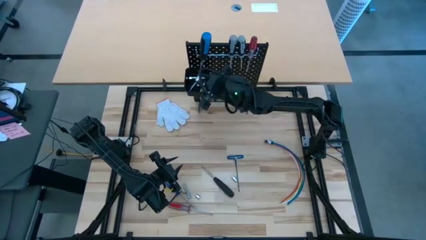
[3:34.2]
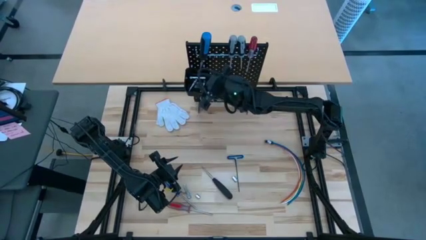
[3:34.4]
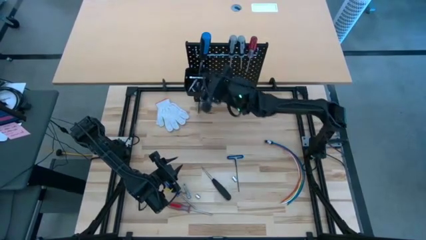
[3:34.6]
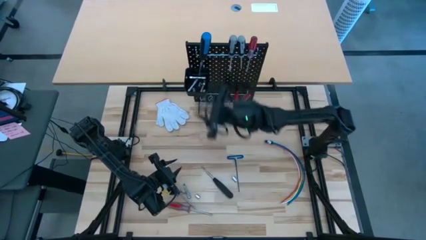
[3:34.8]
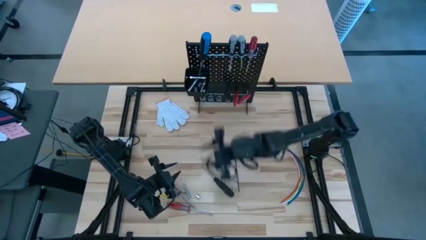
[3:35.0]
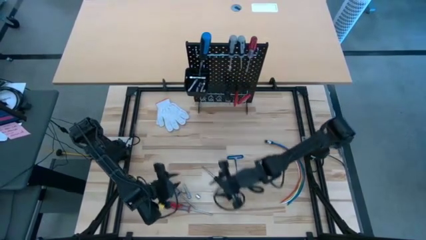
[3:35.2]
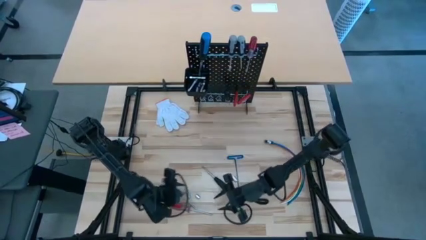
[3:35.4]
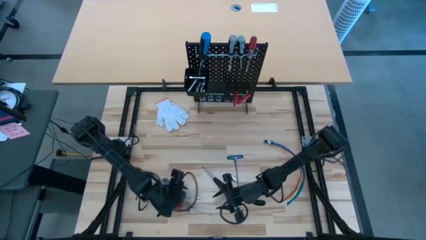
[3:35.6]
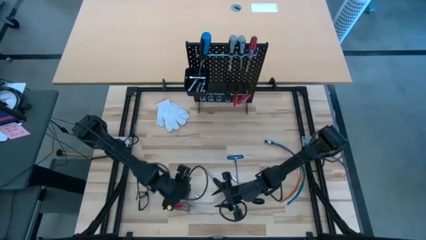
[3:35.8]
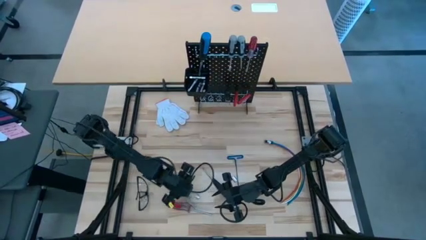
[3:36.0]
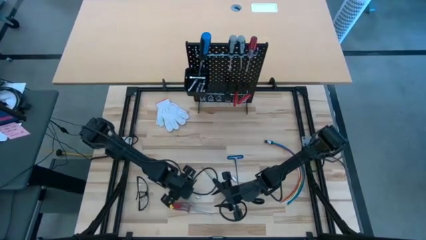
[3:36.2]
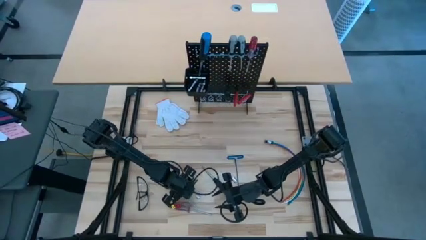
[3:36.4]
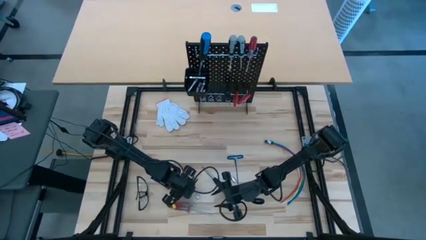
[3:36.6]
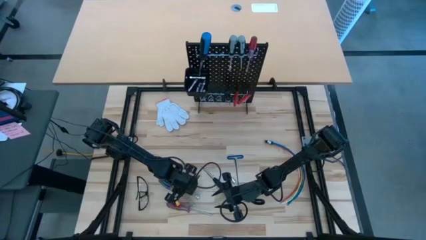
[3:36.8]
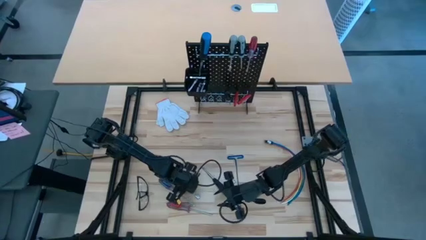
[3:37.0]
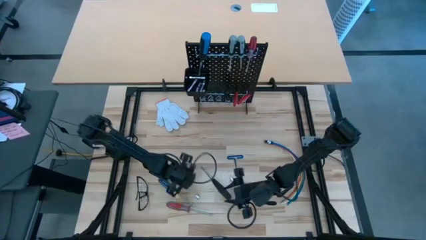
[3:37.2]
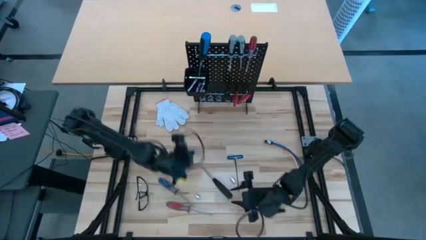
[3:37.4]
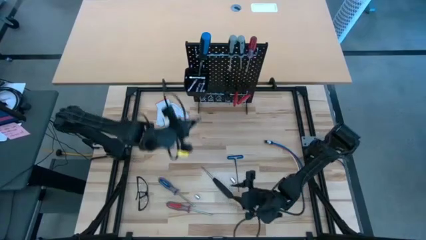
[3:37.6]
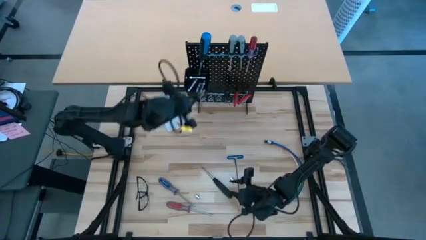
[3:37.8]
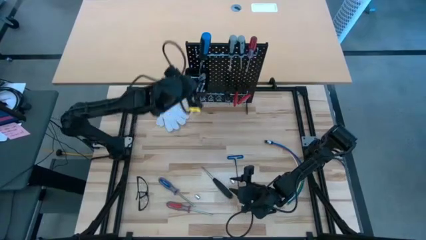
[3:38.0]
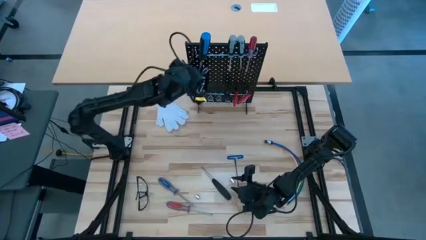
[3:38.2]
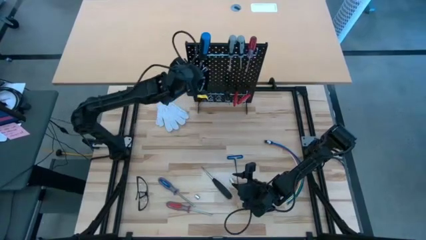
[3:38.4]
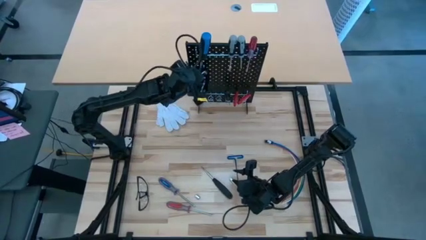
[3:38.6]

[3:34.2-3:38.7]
Task: Hang tools onto peg board
Put the extension bar on the pegboard bin

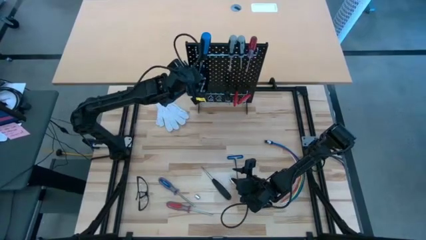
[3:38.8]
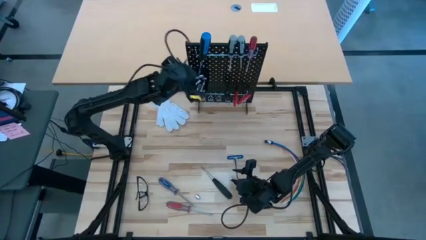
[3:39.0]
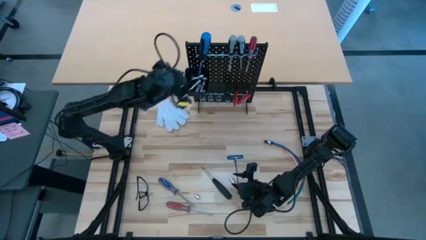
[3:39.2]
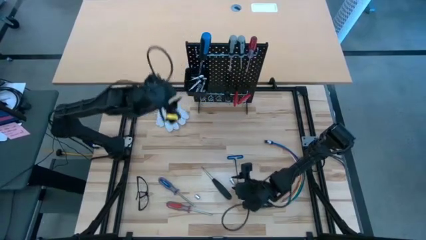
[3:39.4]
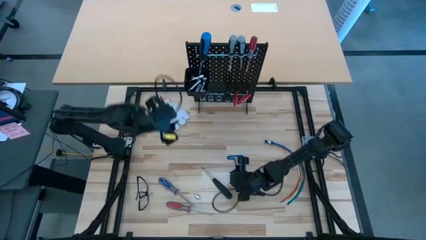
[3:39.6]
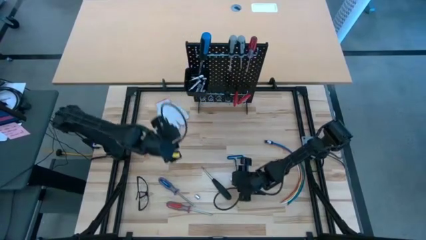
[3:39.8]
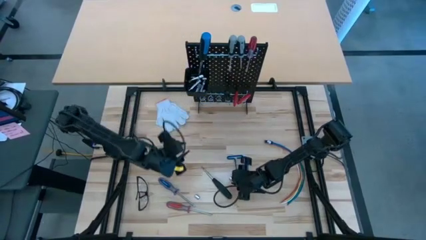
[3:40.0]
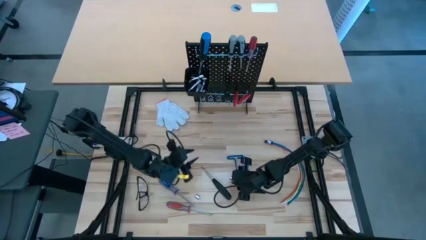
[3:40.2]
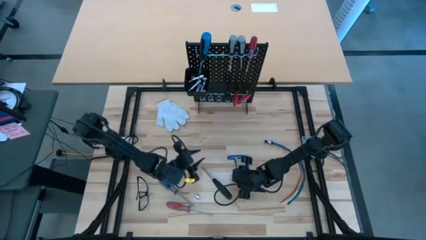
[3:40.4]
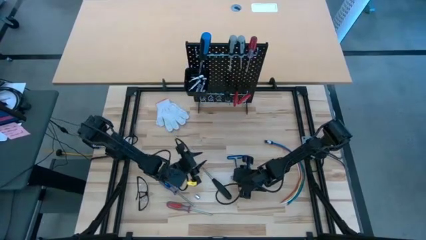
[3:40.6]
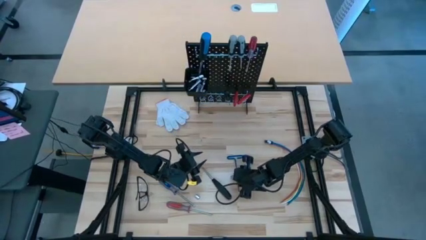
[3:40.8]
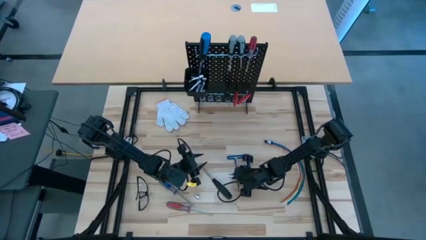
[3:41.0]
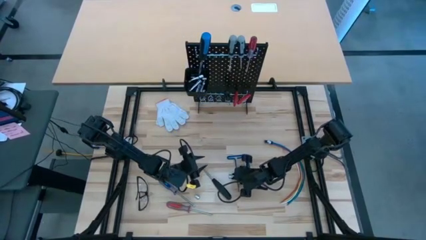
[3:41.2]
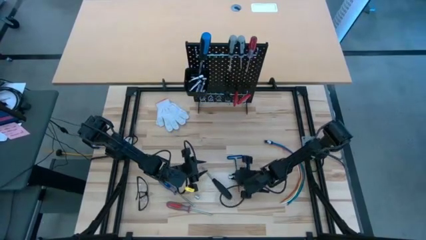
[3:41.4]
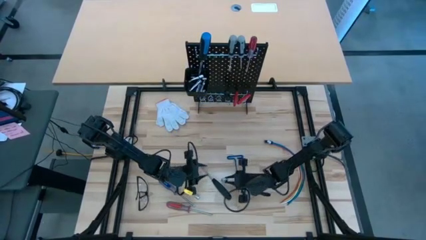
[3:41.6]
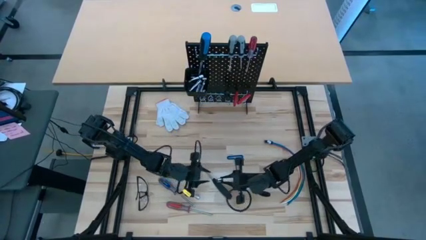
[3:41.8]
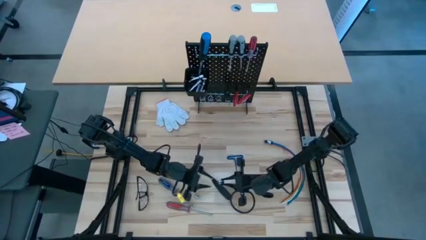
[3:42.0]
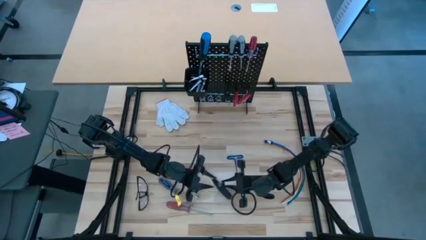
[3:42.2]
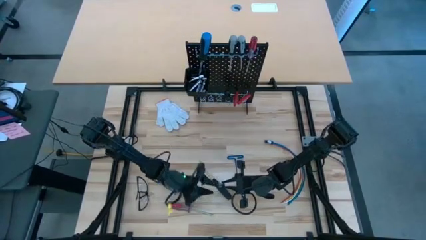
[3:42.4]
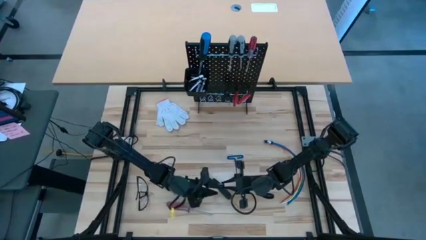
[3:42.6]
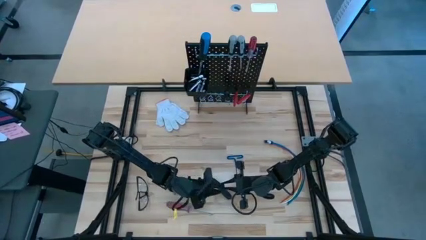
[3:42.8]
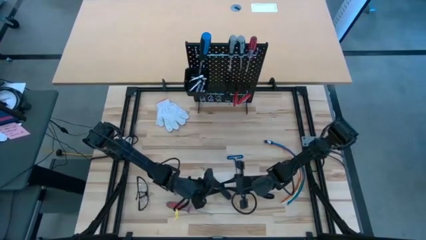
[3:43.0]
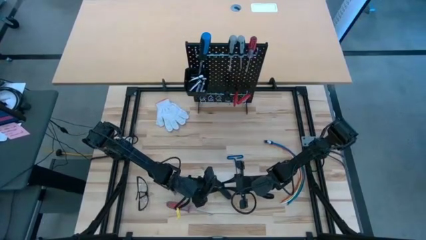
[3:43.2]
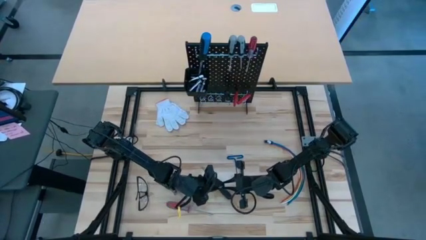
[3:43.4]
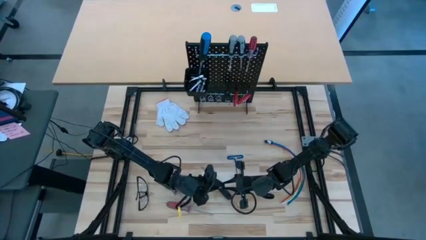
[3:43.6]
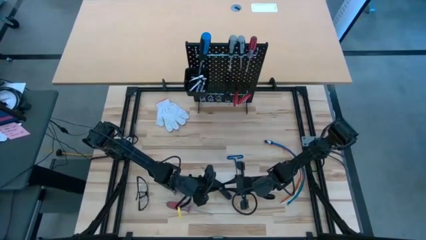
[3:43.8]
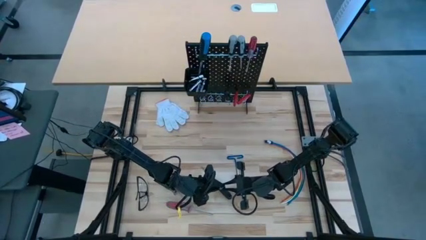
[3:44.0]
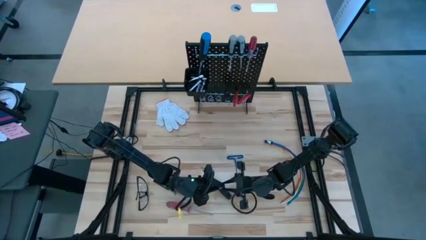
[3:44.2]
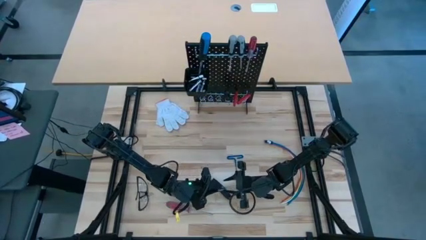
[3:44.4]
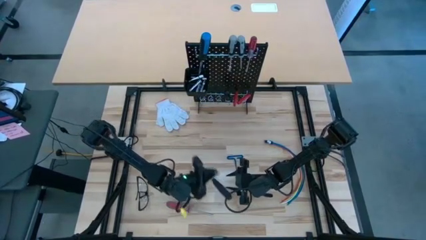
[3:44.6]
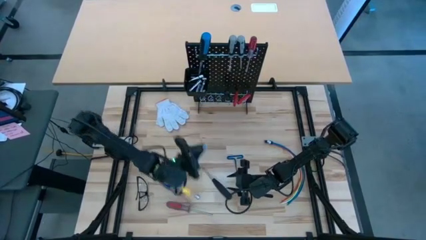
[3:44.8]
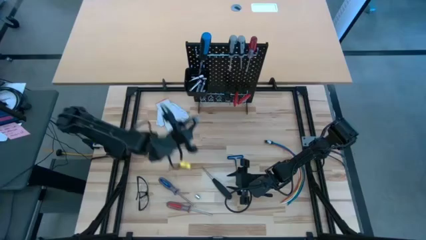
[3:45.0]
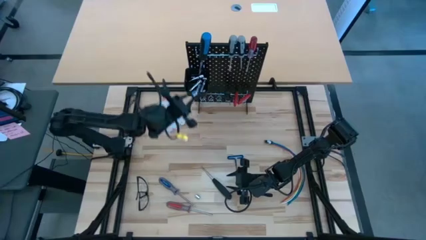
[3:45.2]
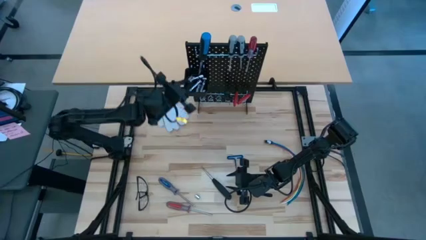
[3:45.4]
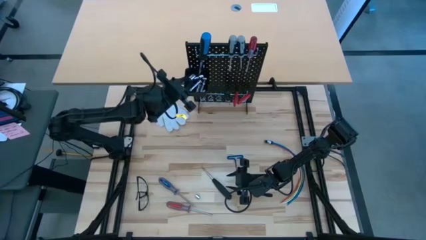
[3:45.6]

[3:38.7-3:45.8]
Put the socket wrench on the pegboard bin

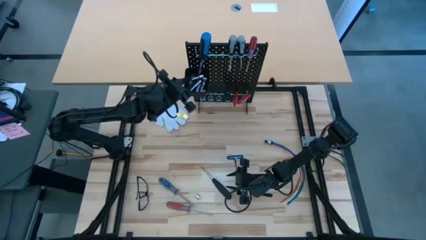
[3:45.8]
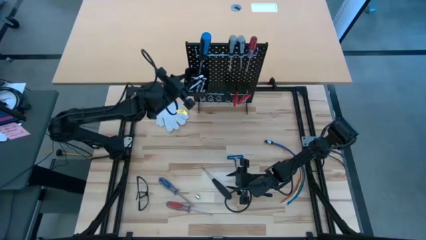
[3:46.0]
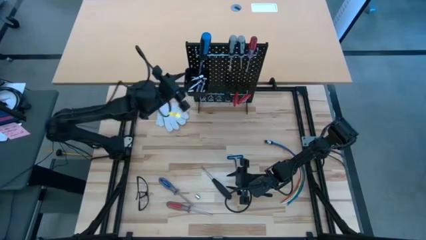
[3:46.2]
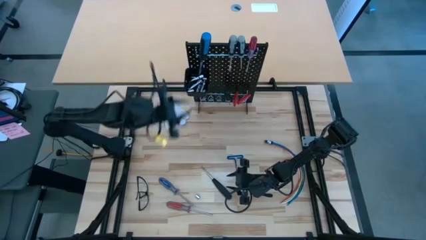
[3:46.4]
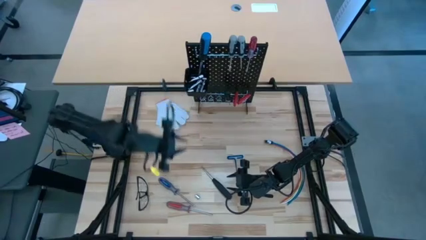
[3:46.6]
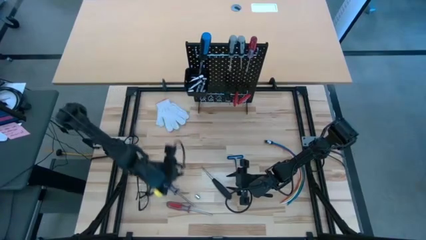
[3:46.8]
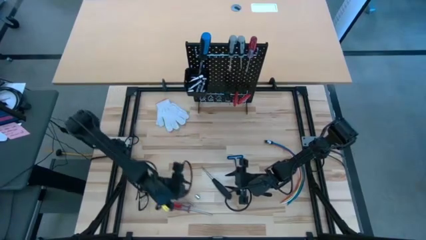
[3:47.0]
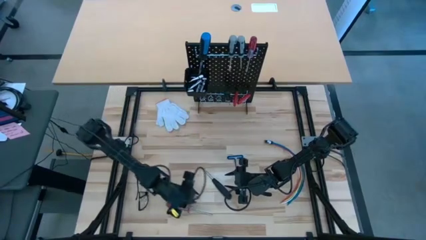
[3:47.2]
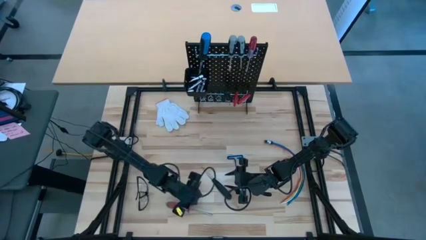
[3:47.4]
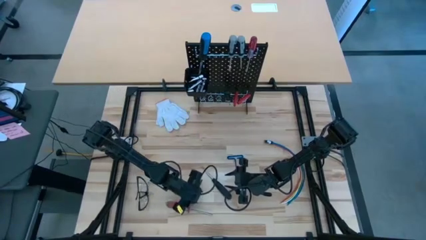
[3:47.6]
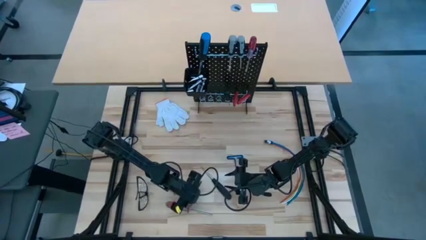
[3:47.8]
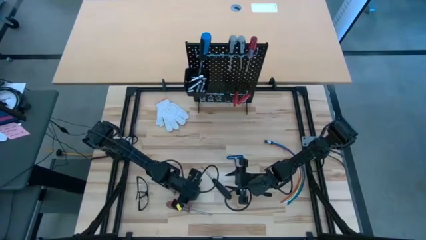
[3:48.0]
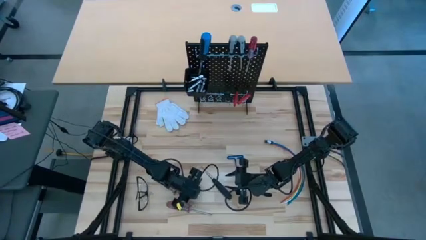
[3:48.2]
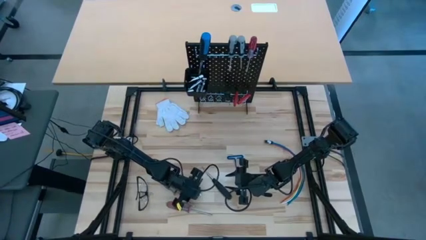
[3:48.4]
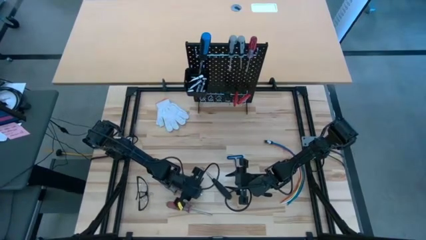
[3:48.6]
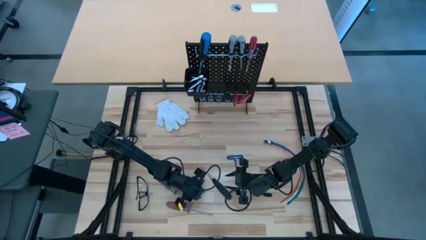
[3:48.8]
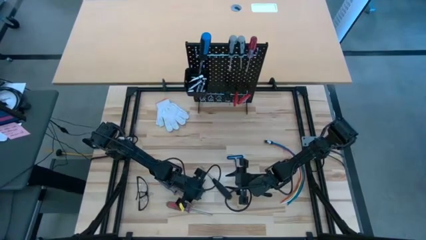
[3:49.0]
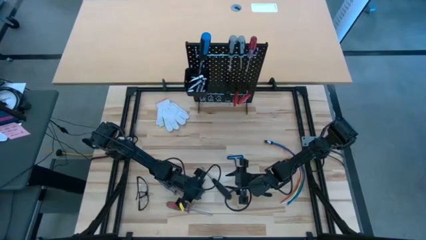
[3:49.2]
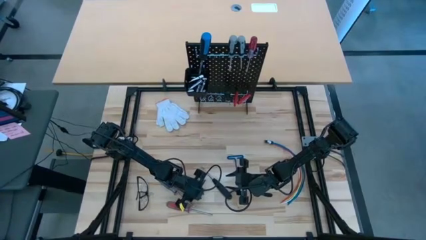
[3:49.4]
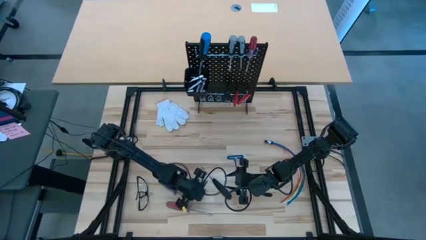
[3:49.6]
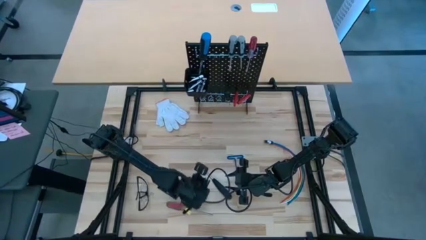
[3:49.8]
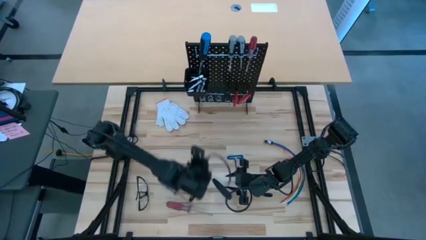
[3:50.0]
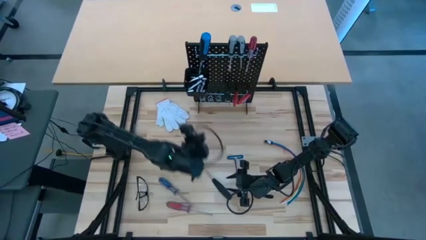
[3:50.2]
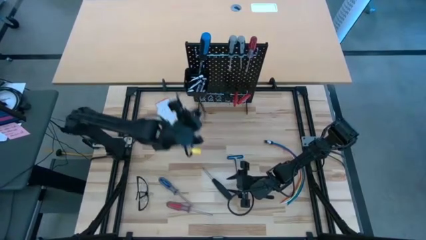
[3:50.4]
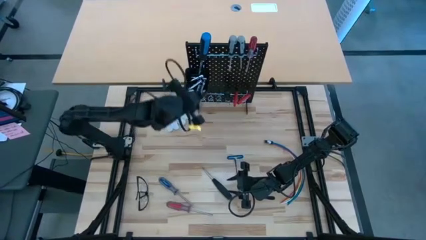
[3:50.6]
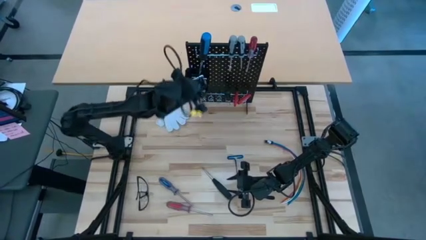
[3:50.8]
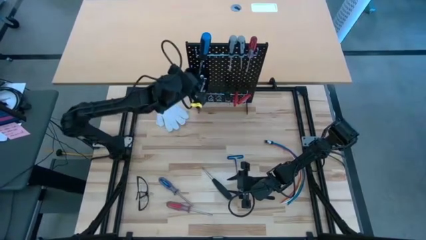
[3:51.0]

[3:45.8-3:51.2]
Put the socket wrench on the pegboard bin
